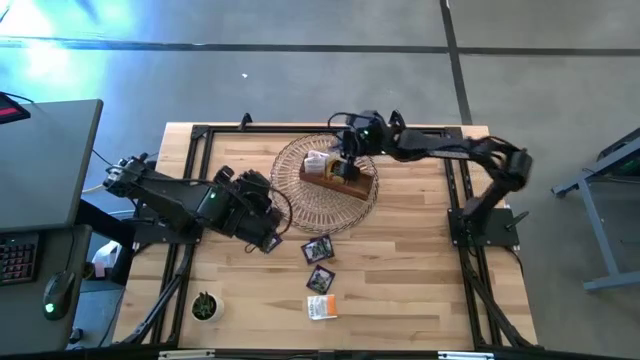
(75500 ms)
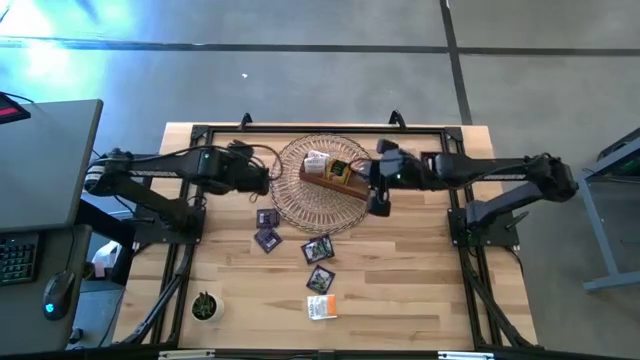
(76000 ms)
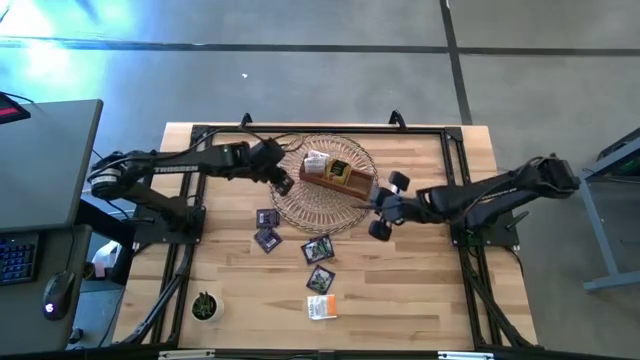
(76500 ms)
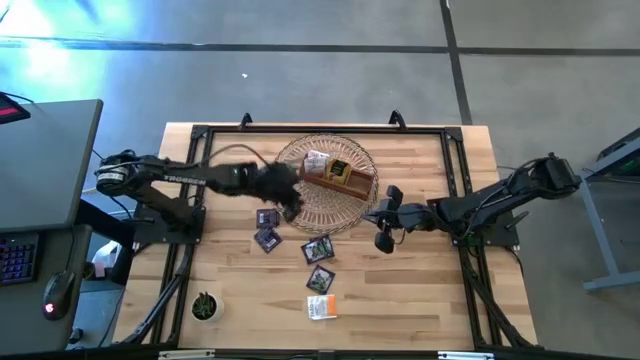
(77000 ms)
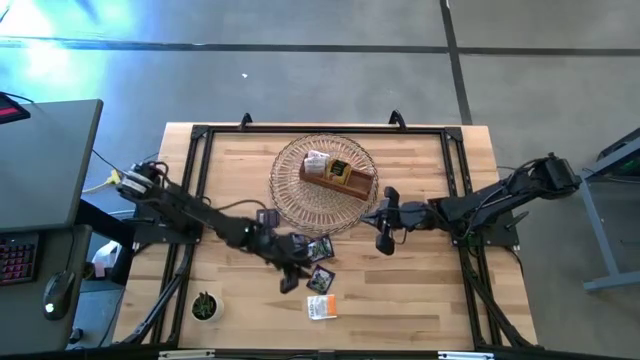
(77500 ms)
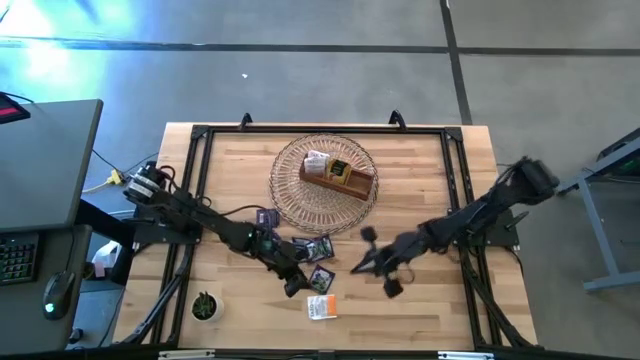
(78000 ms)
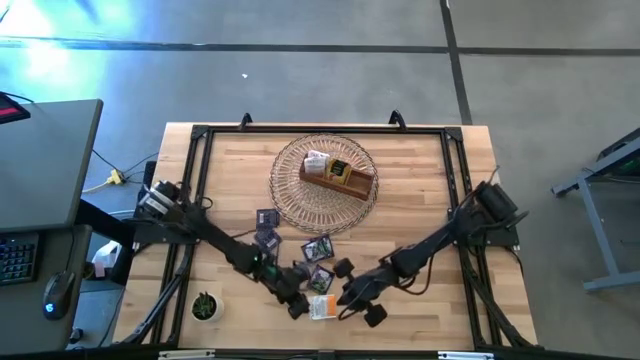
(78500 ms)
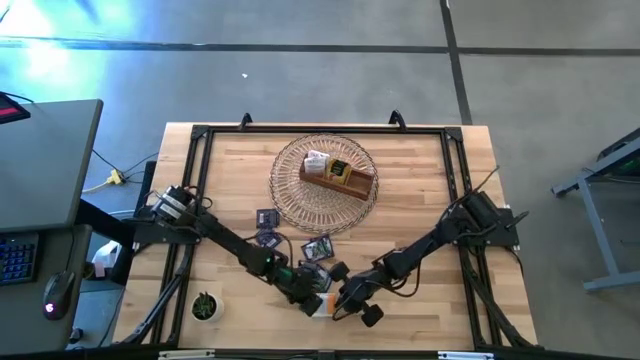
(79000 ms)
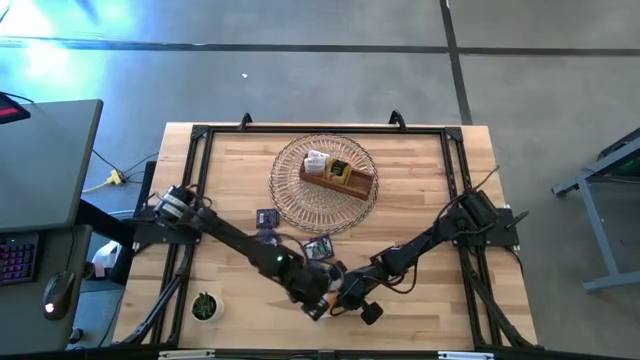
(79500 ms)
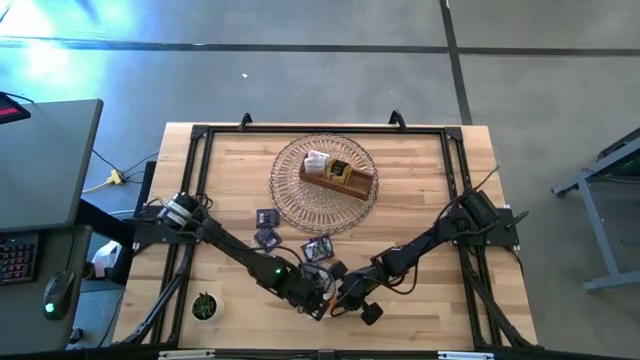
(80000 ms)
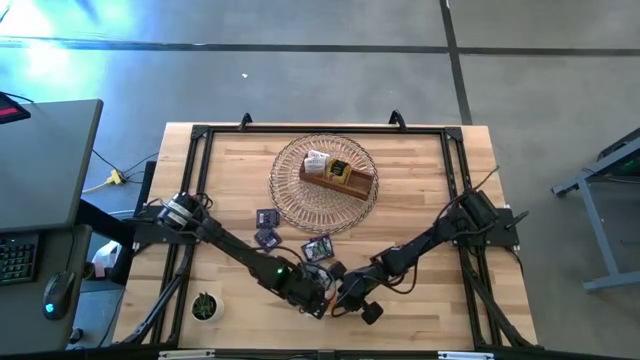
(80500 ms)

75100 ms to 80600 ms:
Task: Pick & Place Tea
Put the white tea bag into the left section of the wooden organizer

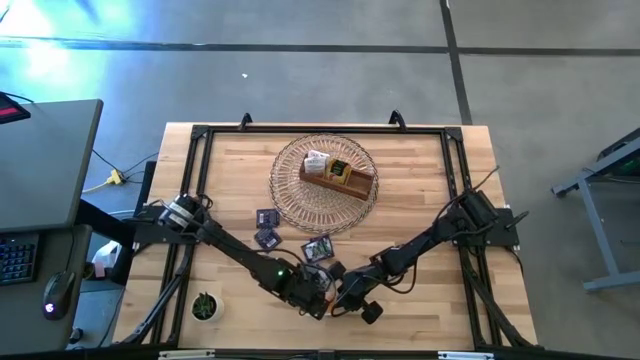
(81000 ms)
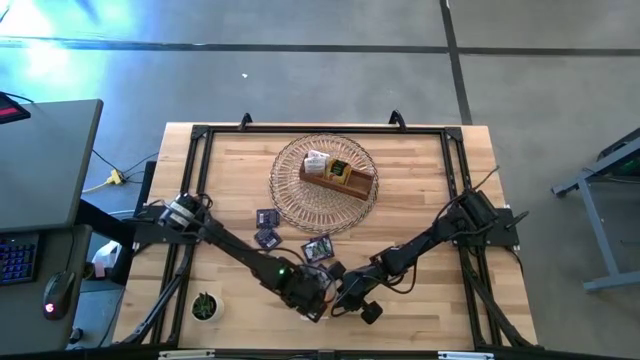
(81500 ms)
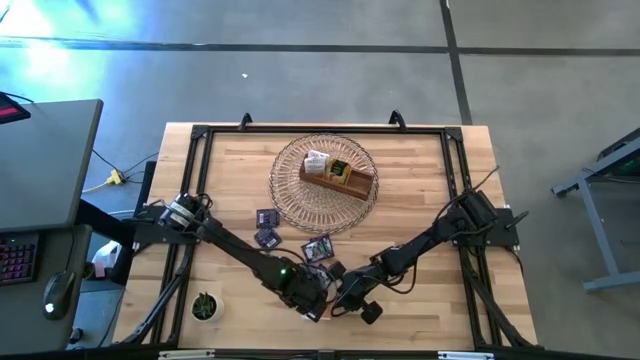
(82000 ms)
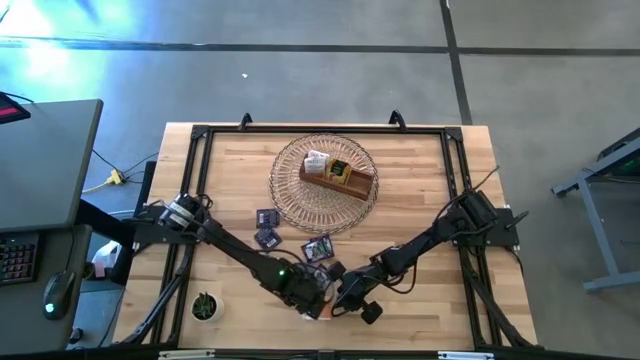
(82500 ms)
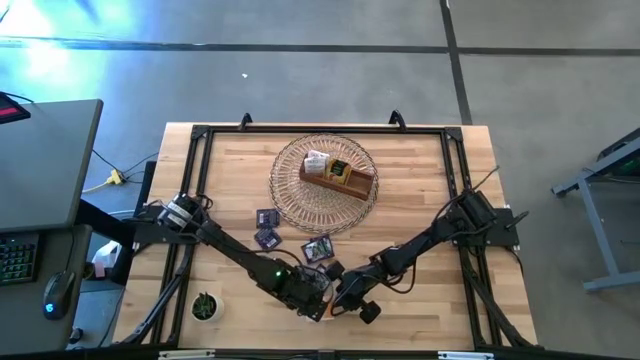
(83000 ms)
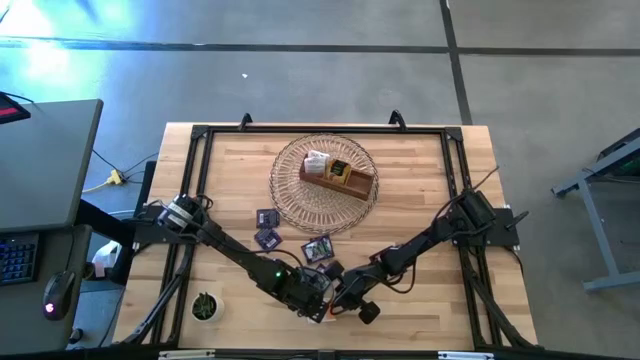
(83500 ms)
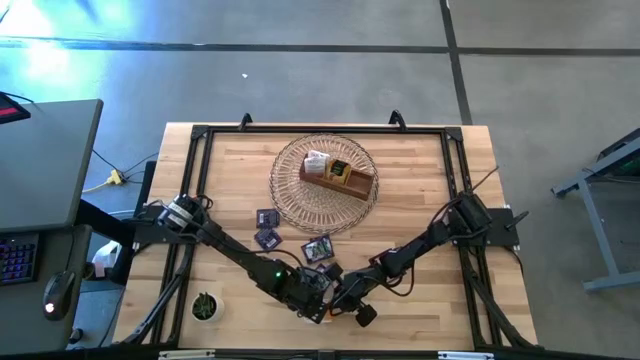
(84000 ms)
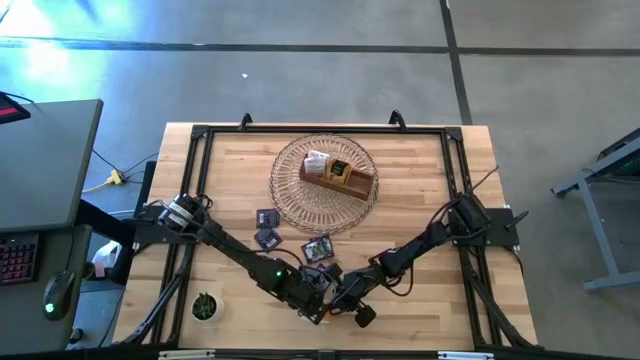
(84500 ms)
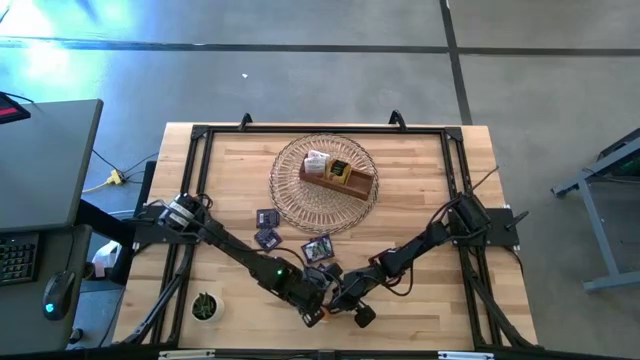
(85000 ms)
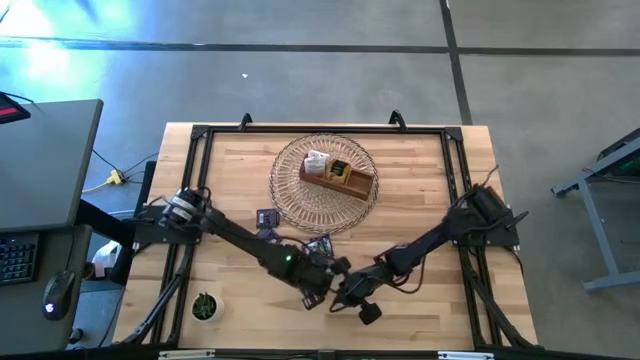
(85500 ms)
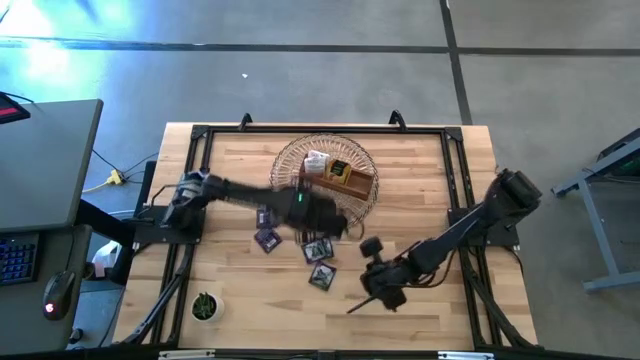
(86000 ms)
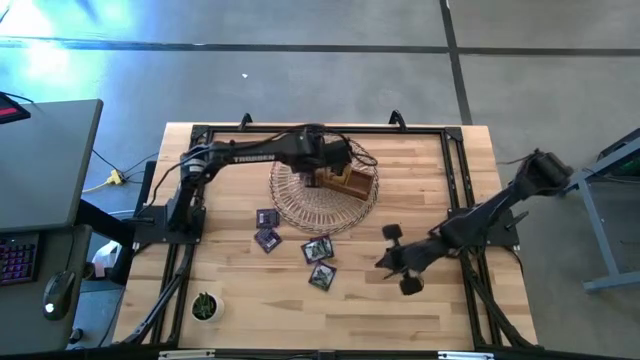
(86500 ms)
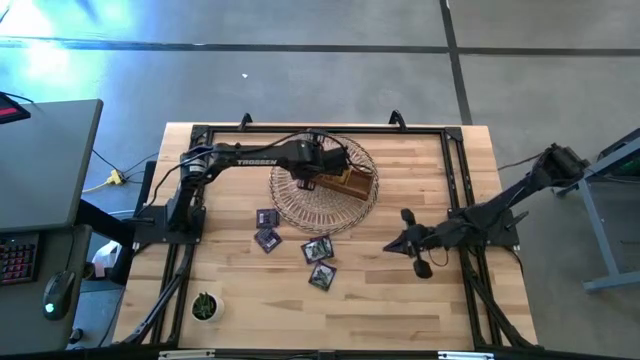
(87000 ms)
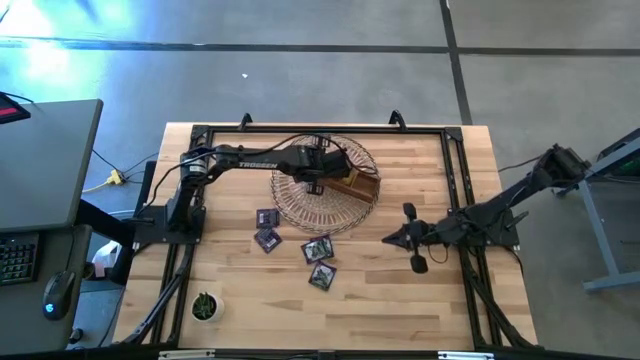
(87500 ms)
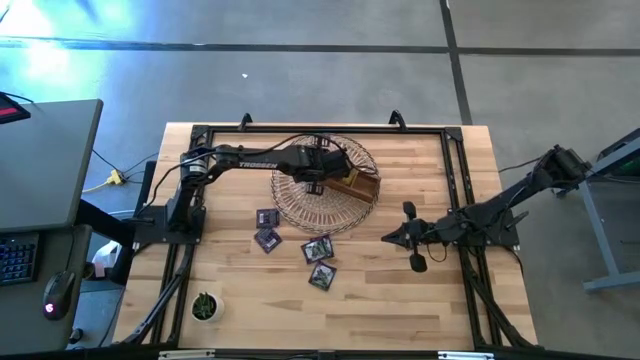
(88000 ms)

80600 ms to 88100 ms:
Put the white tea bag into the left section of the wooden organizer

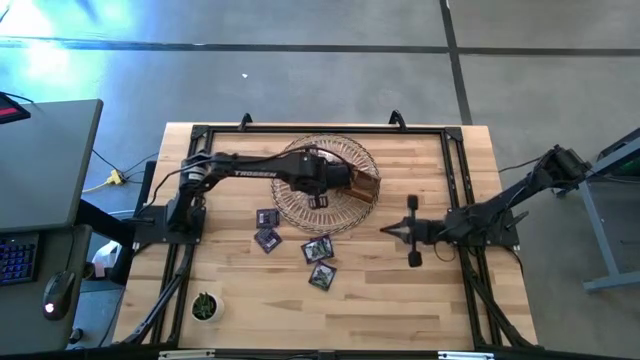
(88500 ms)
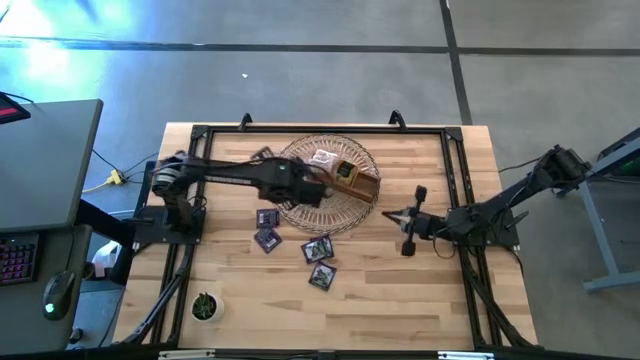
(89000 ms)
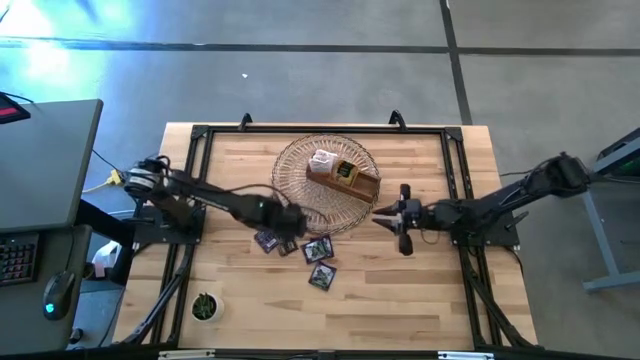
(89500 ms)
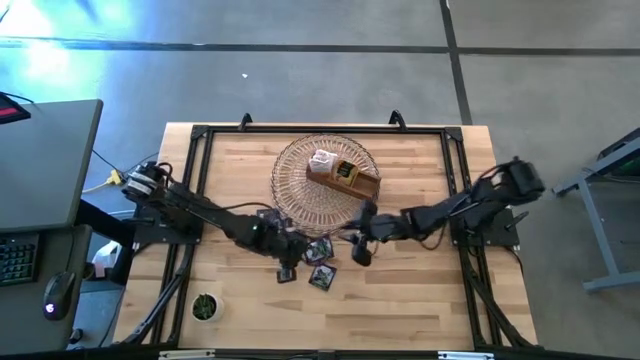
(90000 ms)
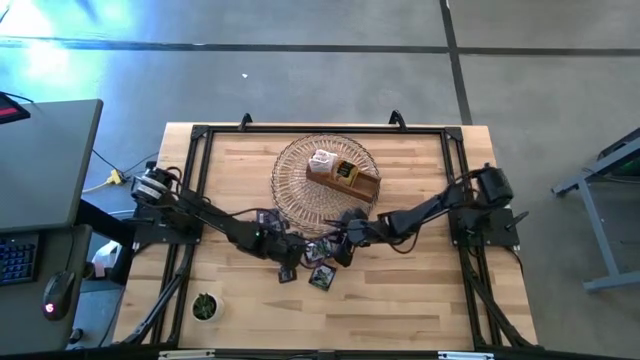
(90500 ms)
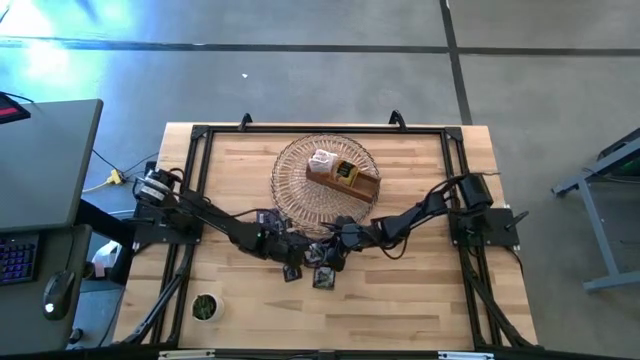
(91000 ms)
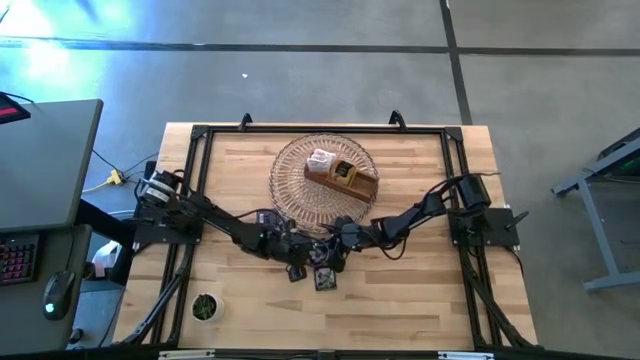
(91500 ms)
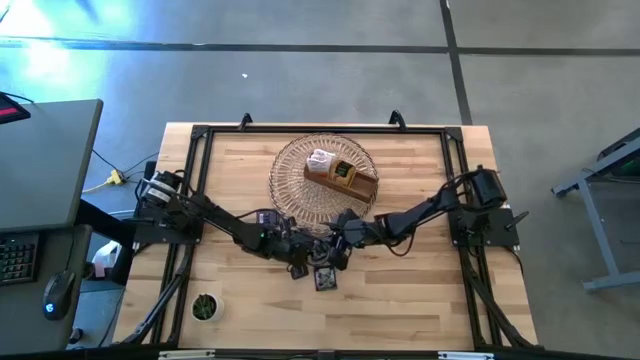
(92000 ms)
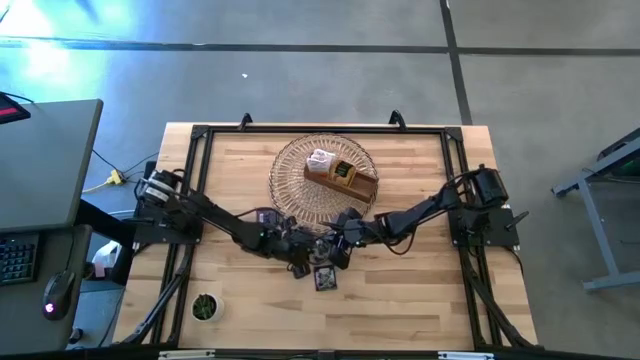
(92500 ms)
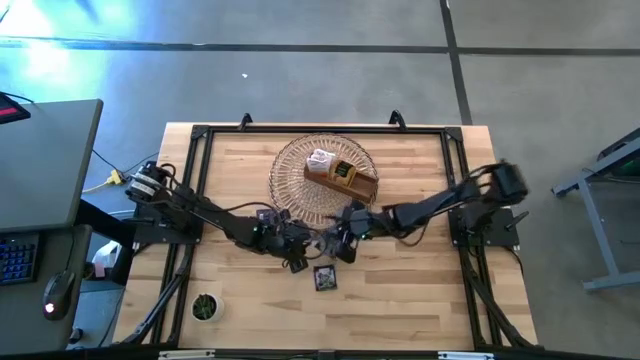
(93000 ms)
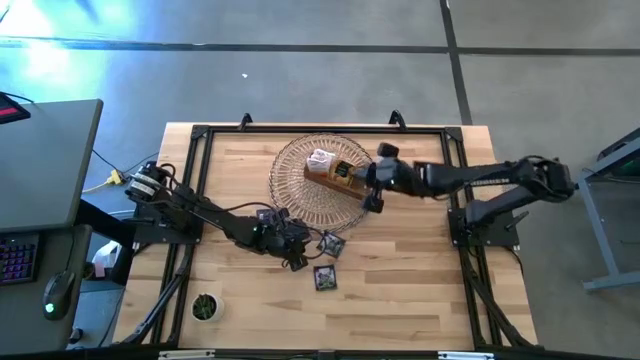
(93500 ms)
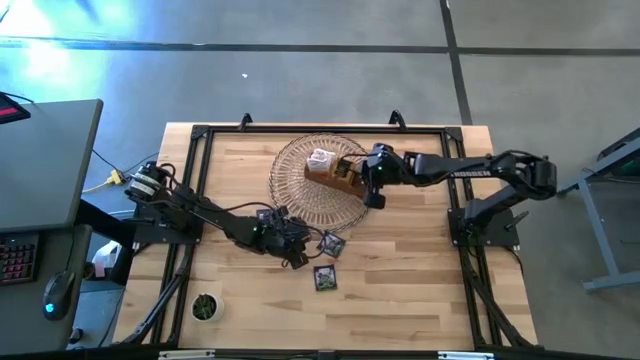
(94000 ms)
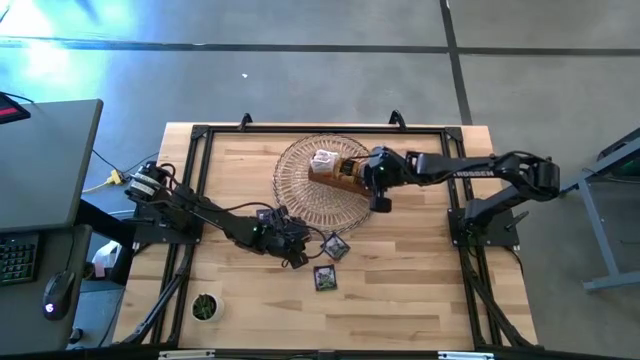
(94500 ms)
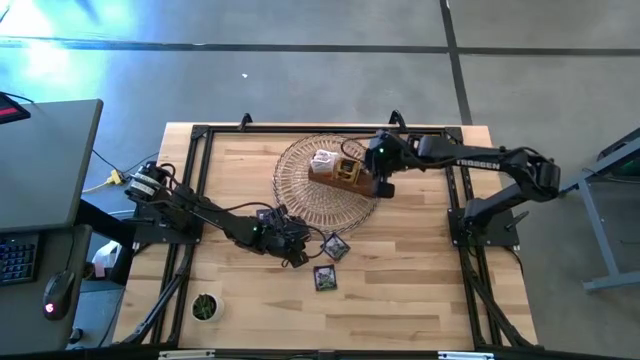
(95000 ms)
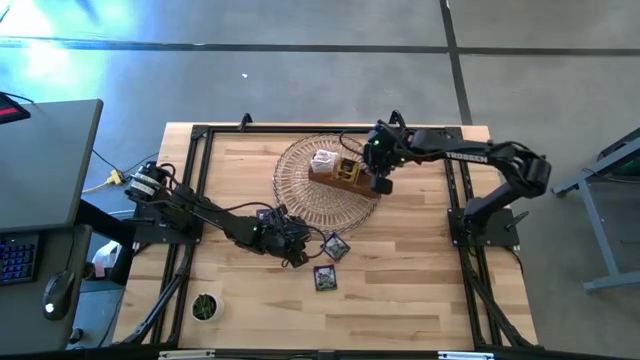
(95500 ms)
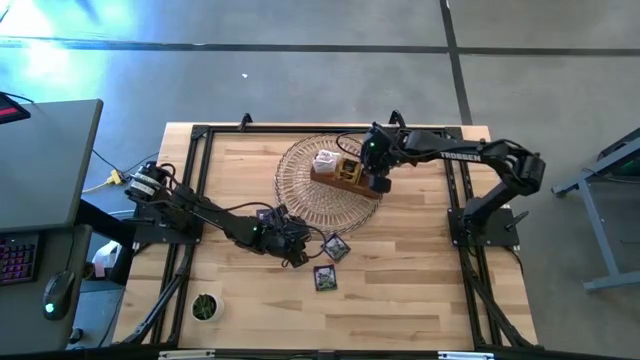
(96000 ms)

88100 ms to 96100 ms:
Put the purple tea bag into the right section of the wooden organizer
